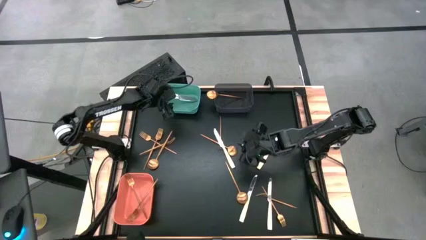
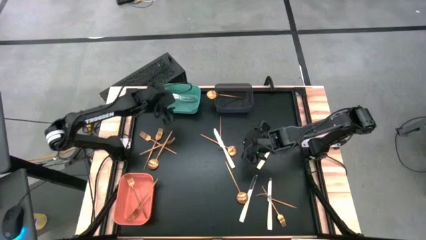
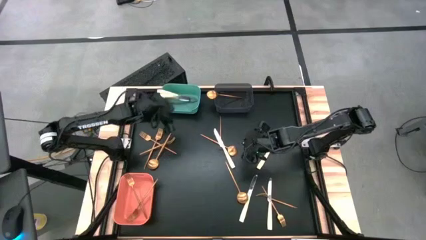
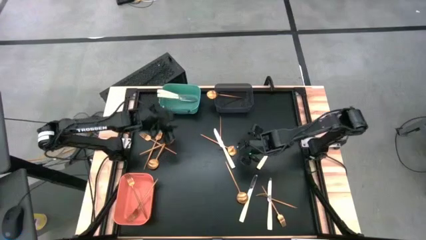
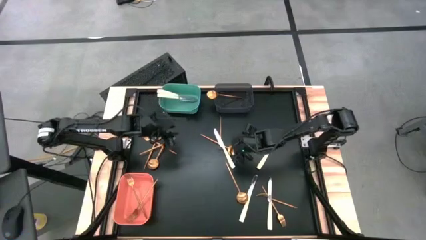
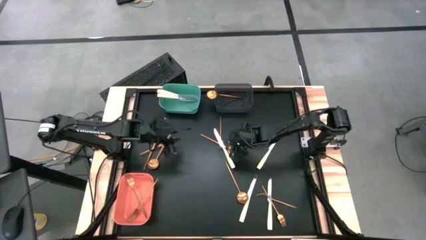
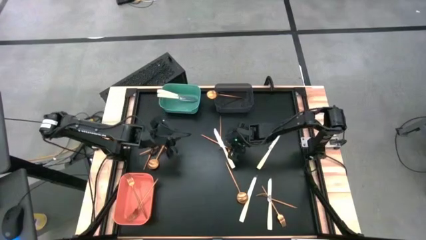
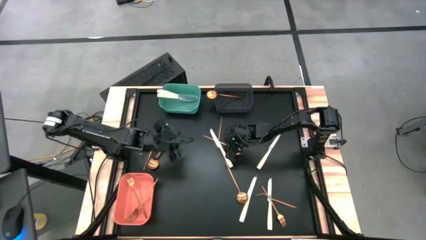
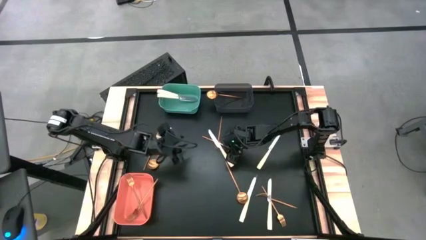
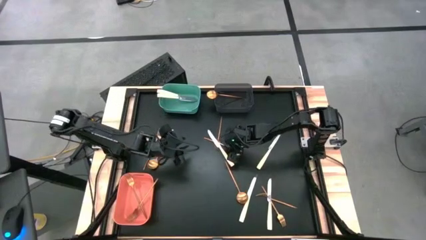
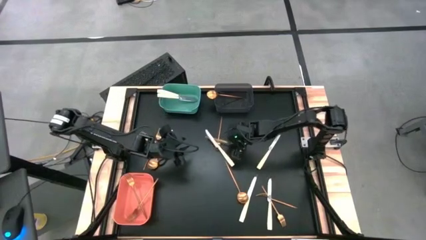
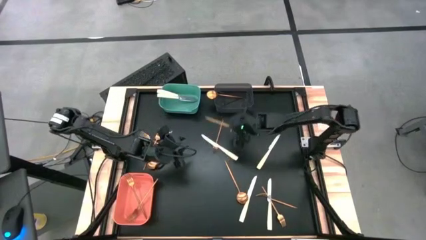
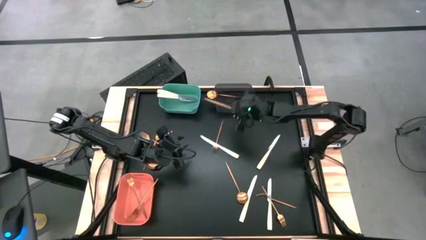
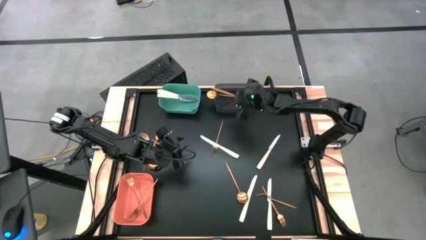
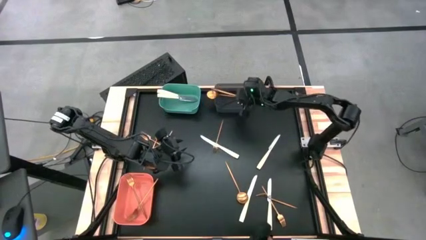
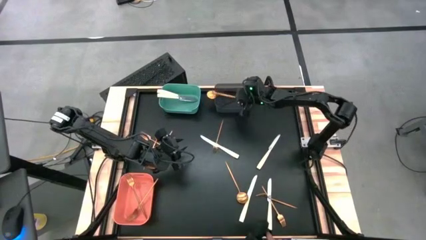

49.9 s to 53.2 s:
Task: Sort silverware by color (type)
Put the gold spoon into the black bin

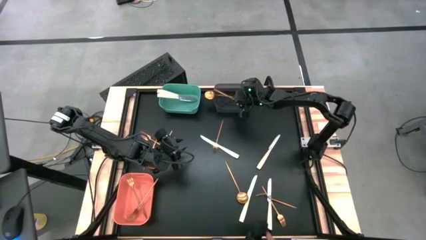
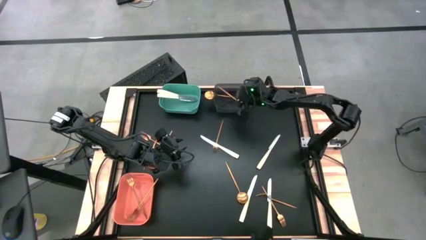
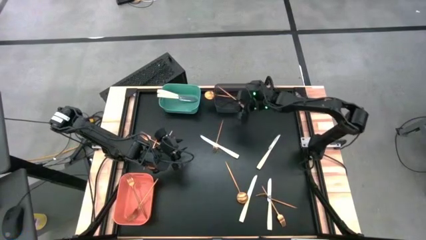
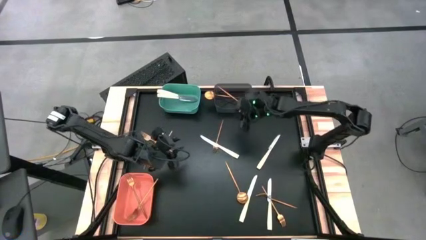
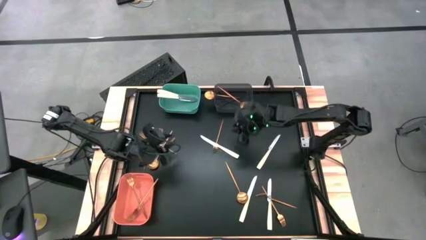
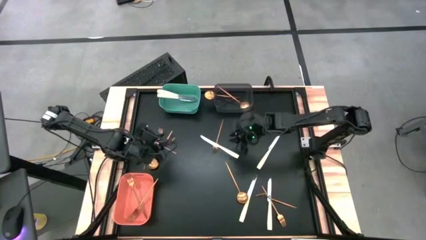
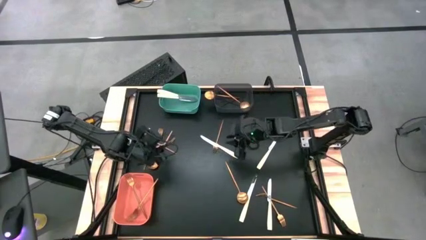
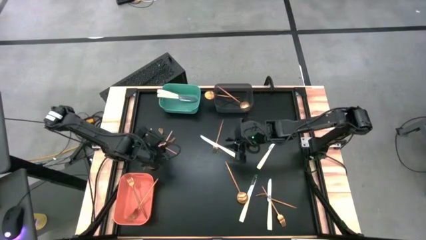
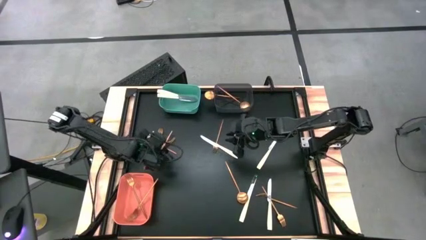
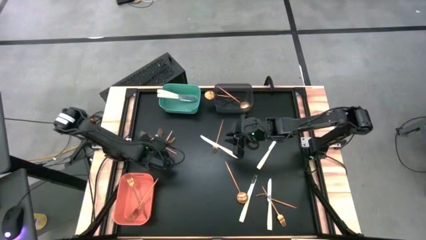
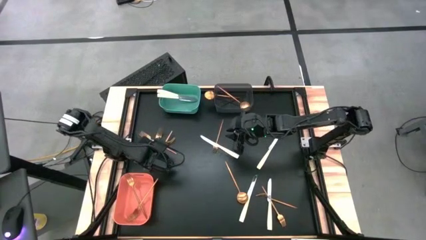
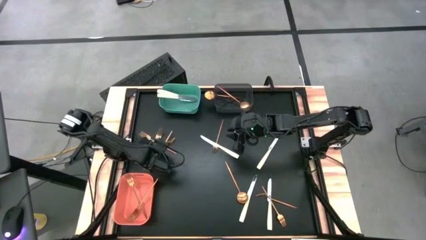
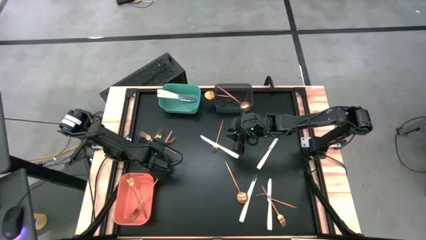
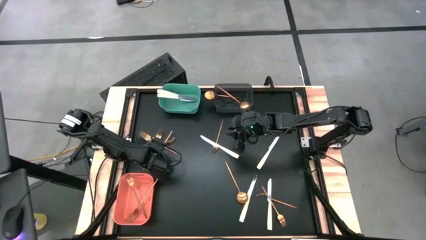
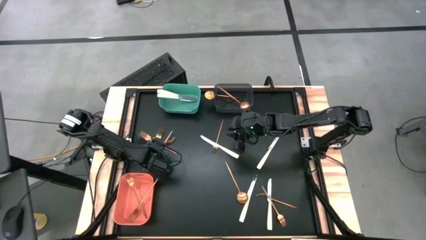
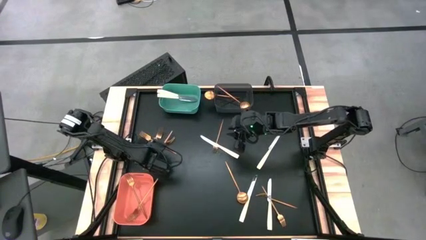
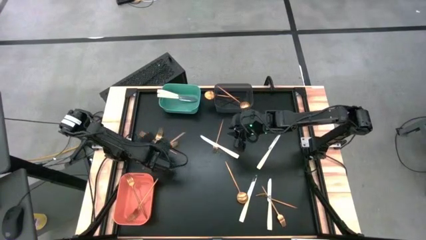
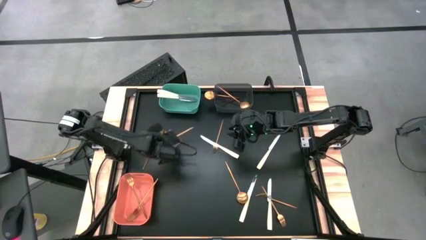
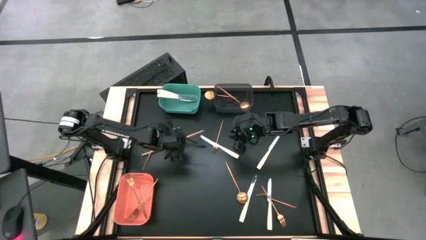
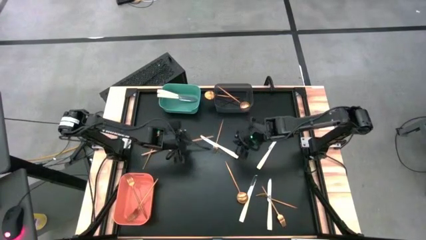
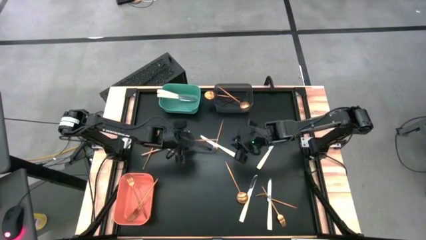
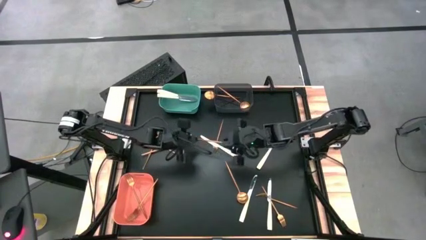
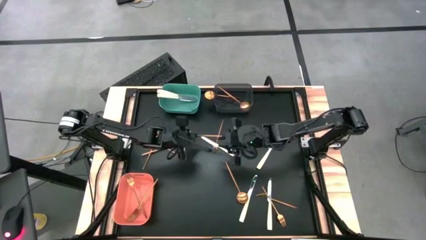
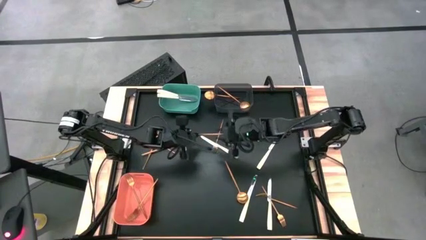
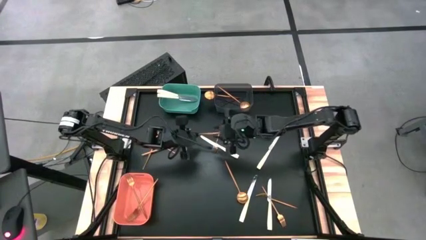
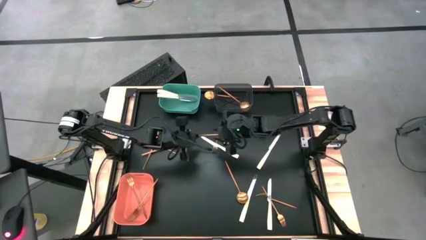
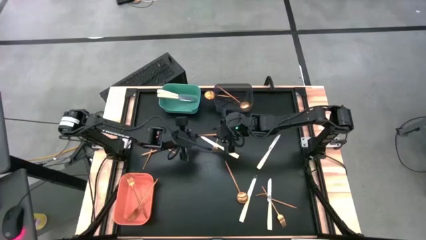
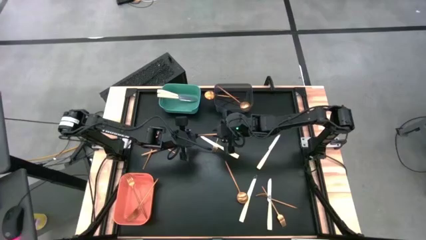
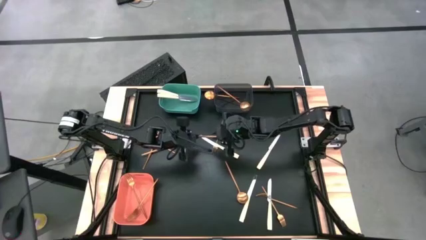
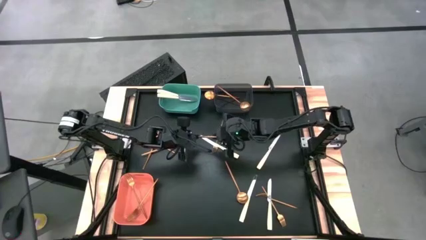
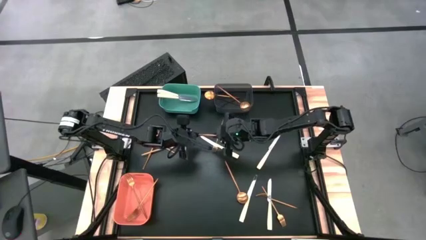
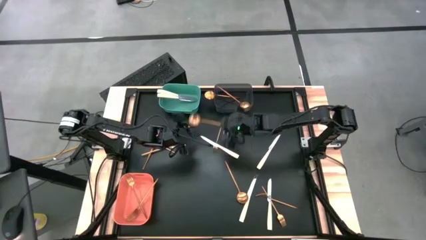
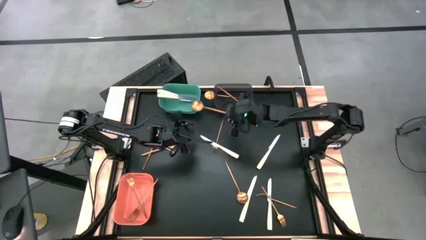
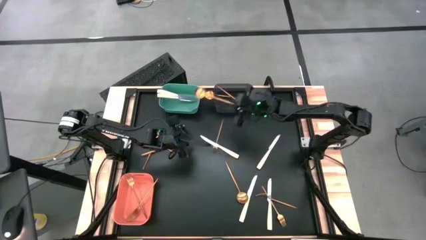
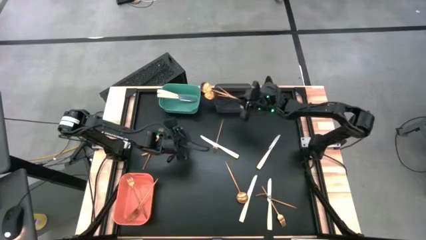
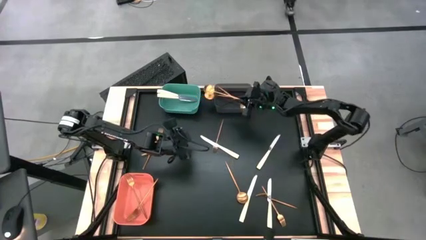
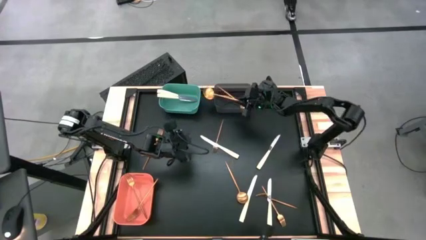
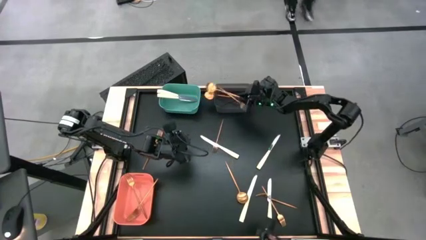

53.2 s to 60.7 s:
Put the gold spoon into the black bin

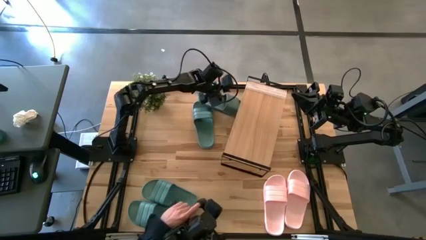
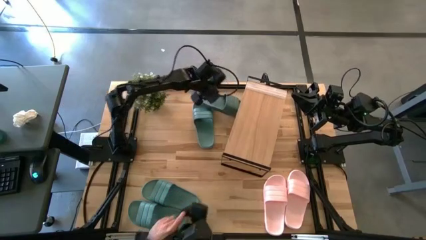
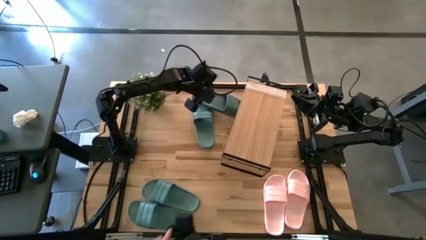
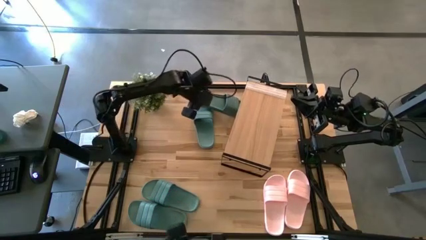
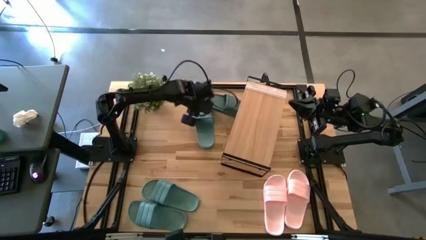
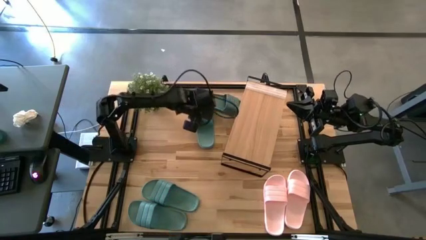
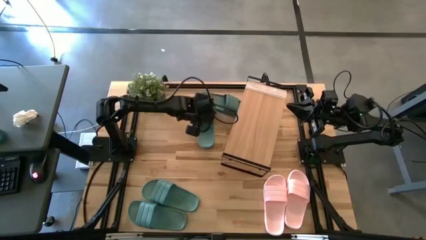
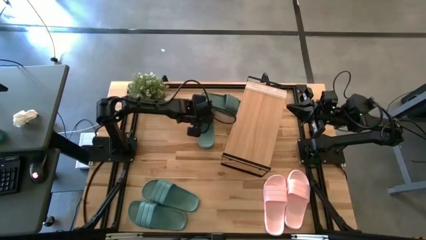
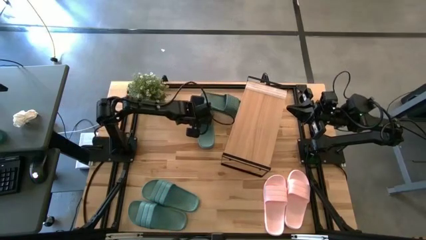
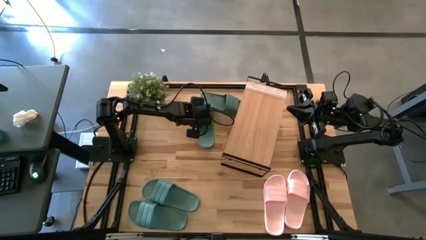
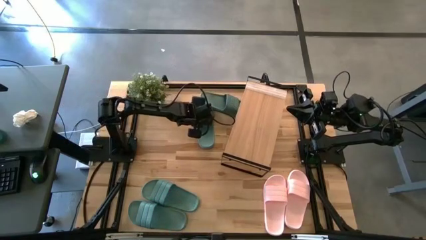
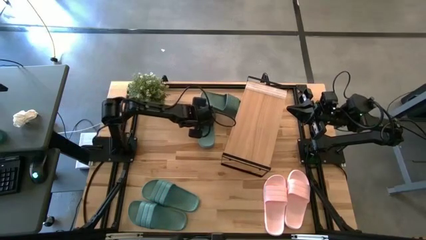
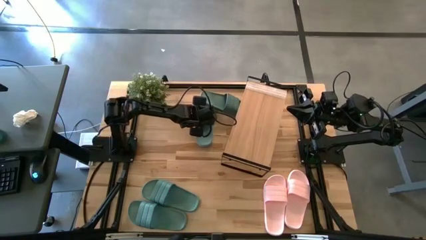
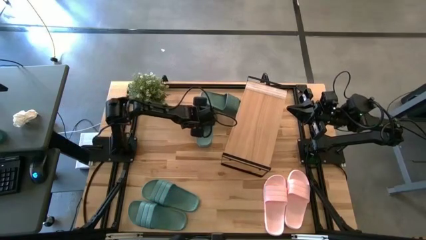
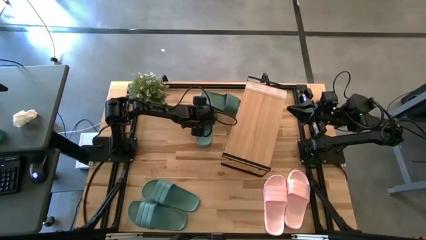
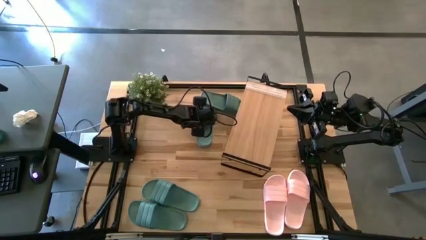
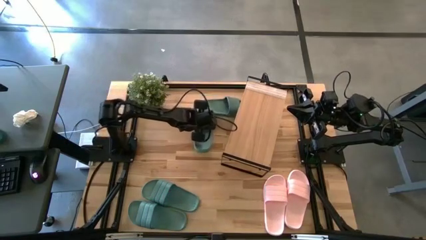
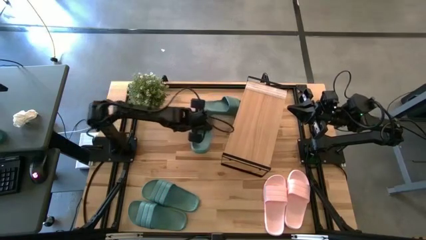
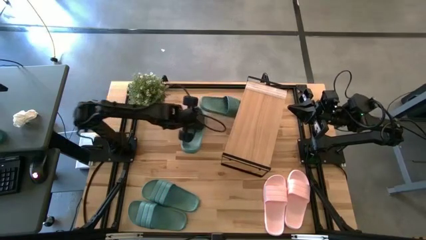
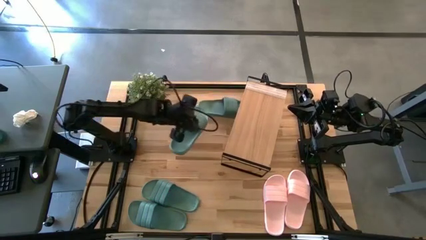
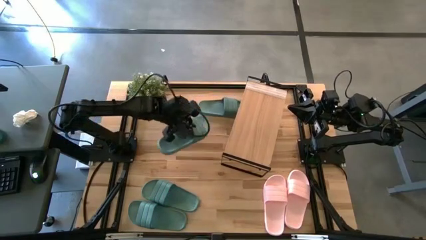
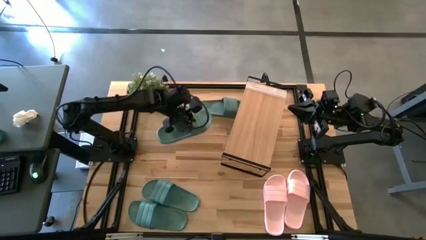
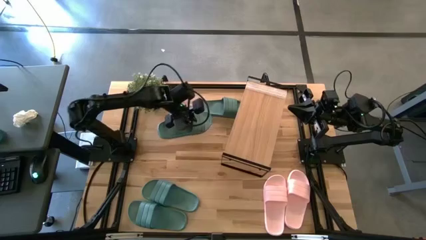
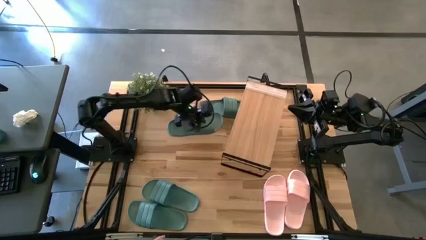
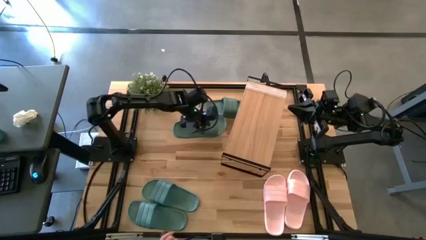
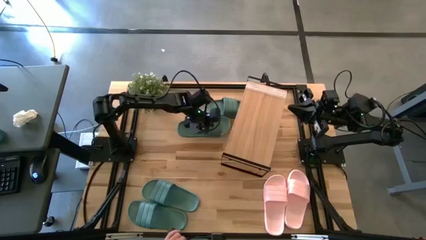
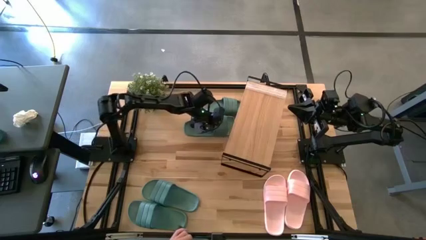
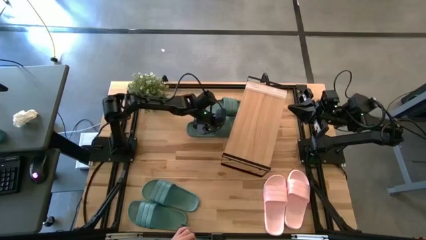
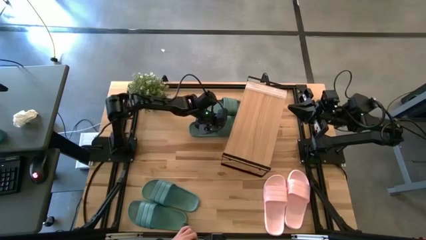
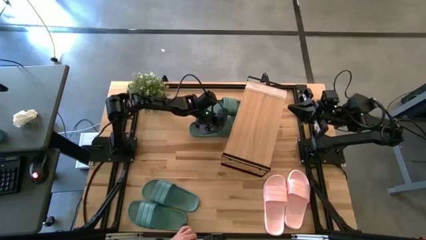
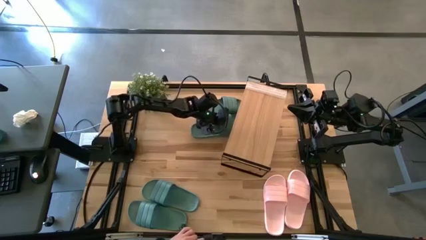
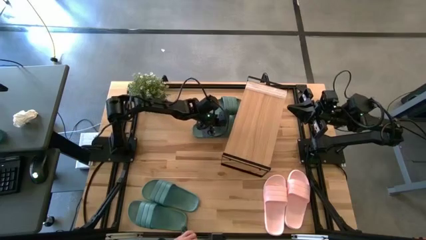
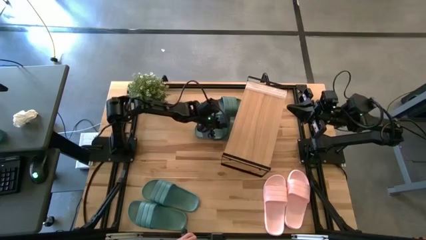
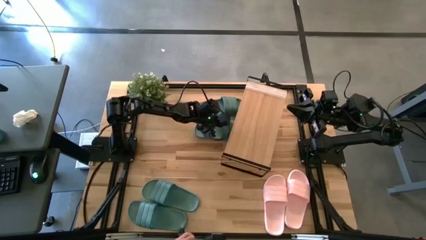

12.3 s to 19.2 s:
Task: Pick and place slides into the shelf
Put the slide under the shelf
